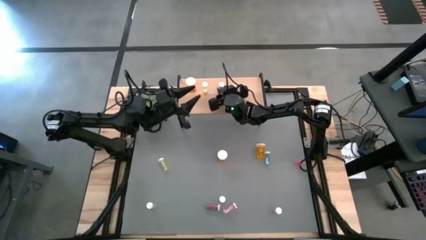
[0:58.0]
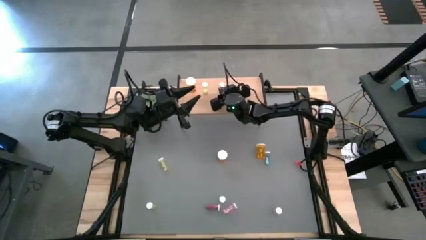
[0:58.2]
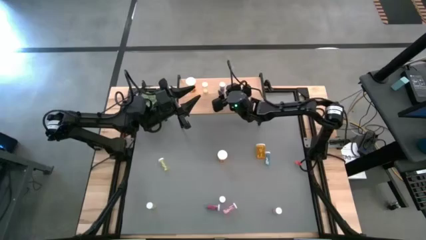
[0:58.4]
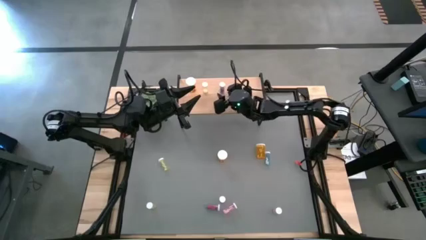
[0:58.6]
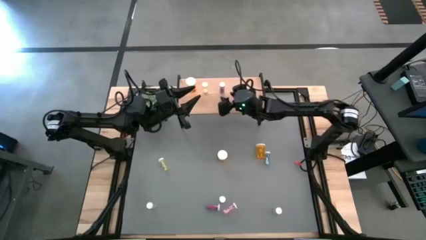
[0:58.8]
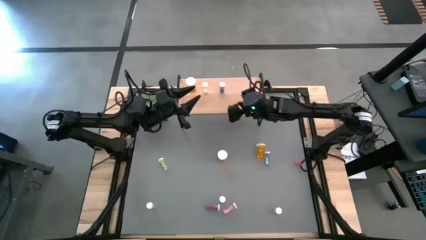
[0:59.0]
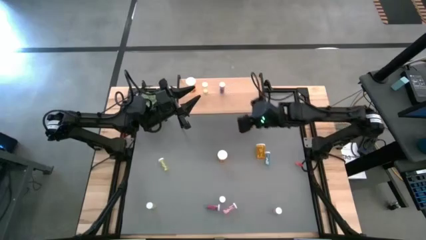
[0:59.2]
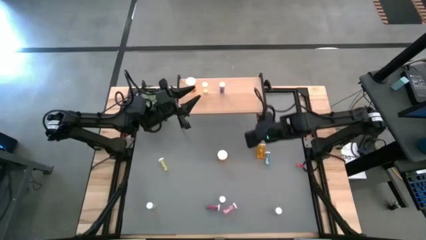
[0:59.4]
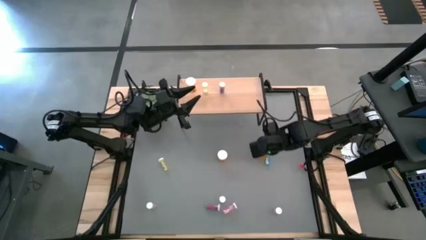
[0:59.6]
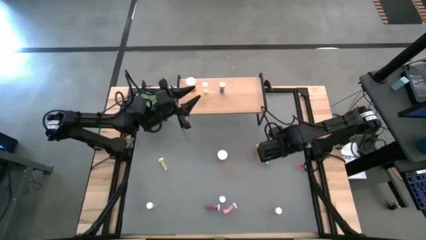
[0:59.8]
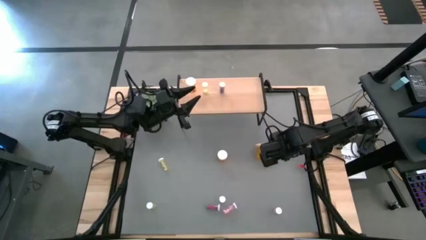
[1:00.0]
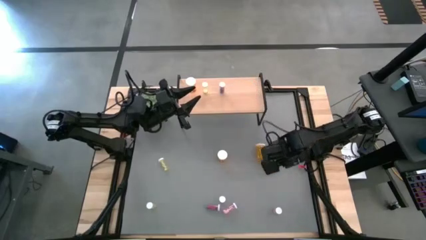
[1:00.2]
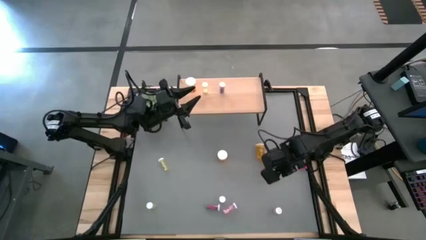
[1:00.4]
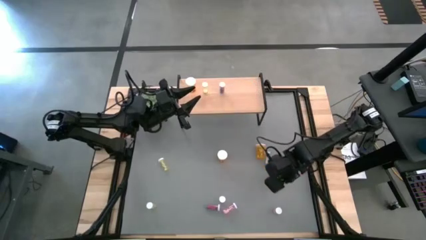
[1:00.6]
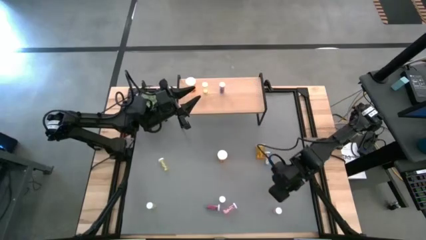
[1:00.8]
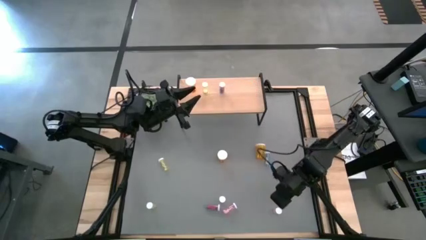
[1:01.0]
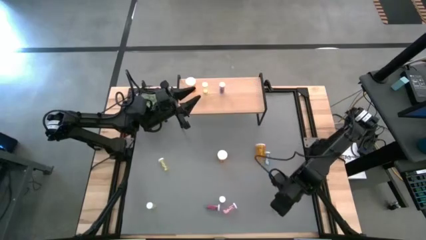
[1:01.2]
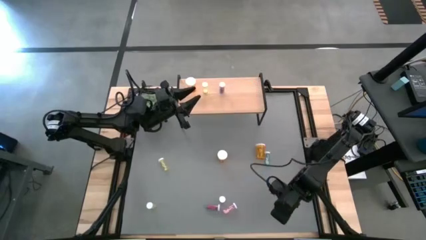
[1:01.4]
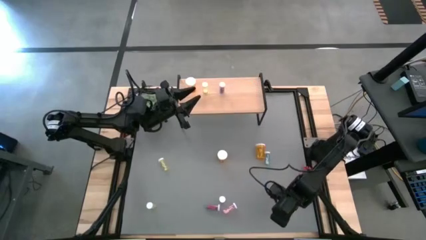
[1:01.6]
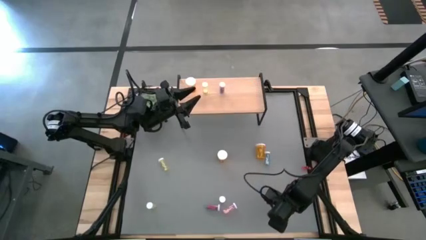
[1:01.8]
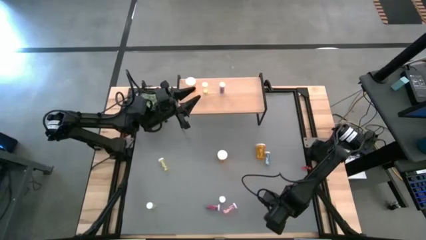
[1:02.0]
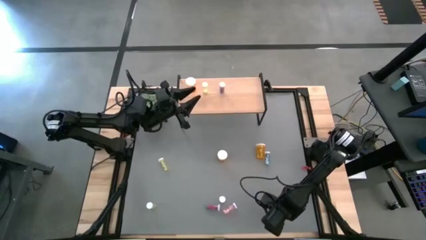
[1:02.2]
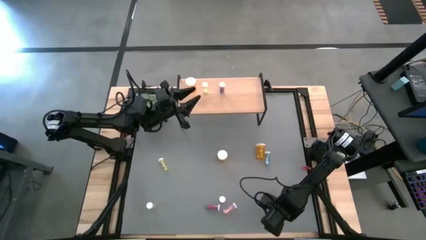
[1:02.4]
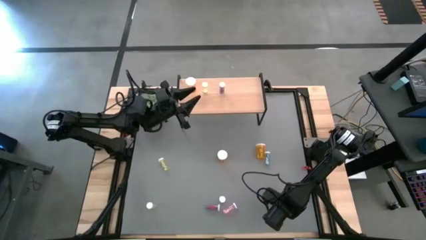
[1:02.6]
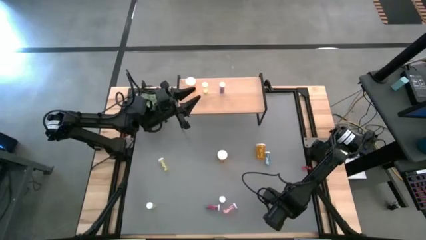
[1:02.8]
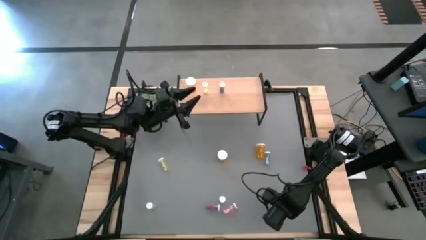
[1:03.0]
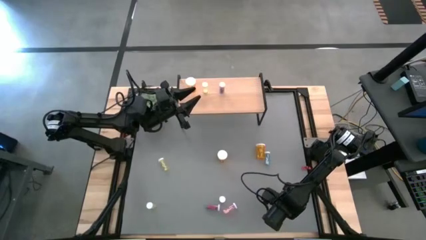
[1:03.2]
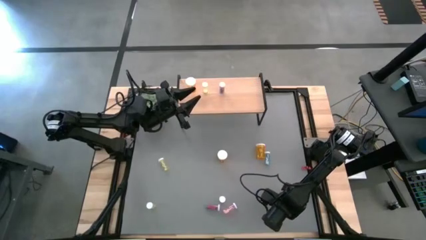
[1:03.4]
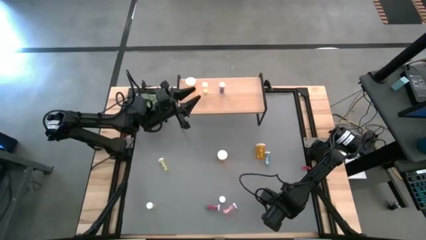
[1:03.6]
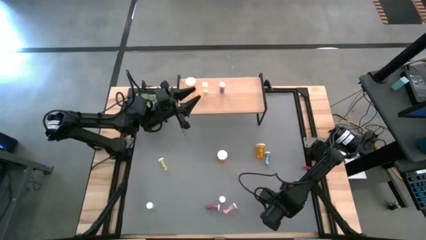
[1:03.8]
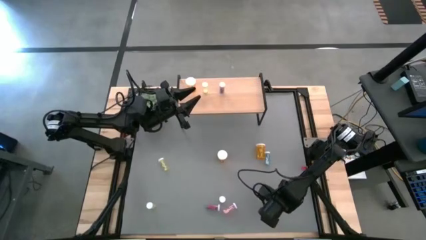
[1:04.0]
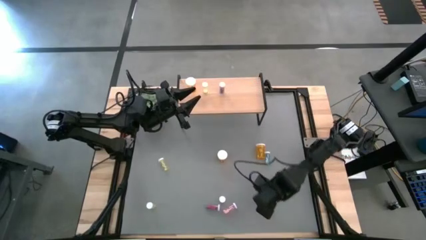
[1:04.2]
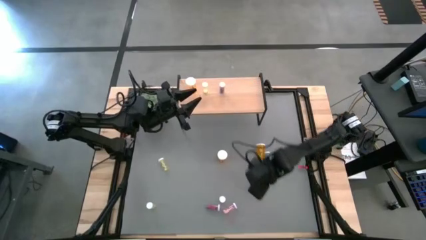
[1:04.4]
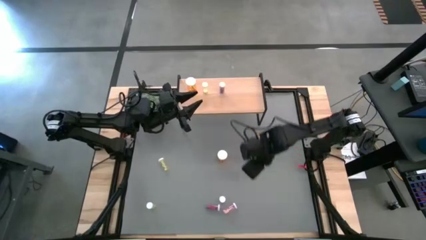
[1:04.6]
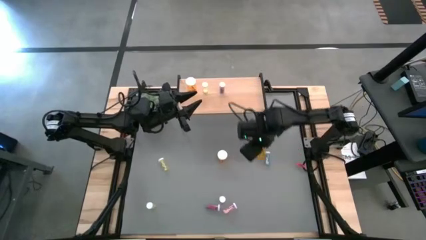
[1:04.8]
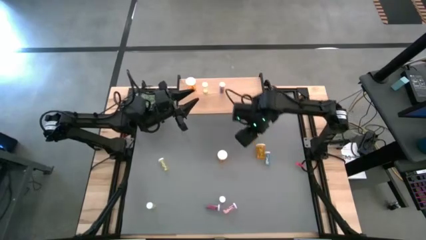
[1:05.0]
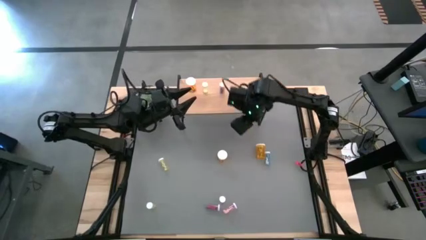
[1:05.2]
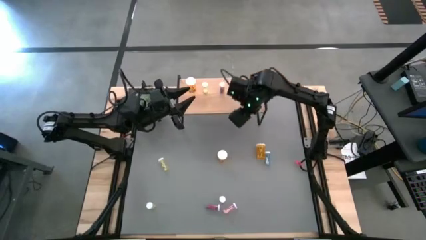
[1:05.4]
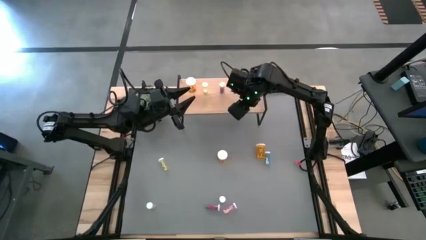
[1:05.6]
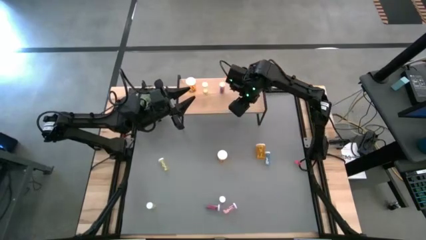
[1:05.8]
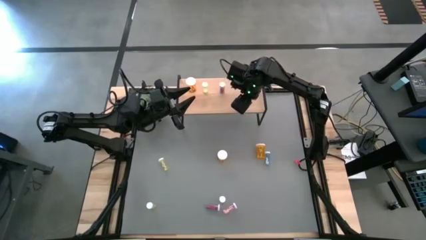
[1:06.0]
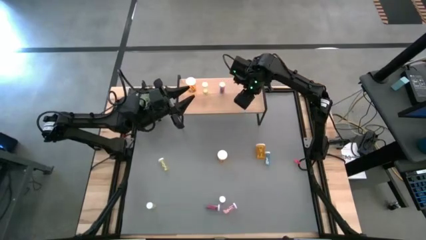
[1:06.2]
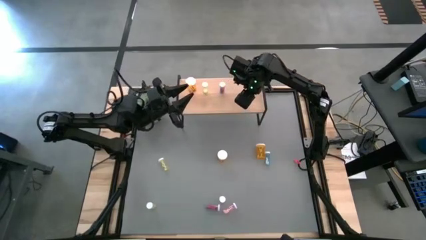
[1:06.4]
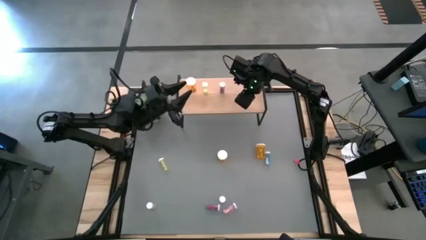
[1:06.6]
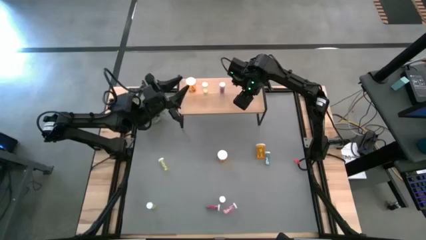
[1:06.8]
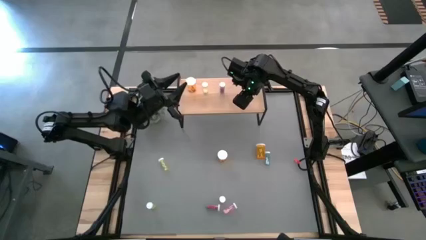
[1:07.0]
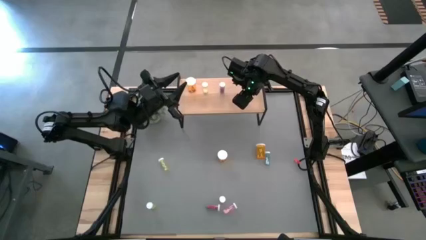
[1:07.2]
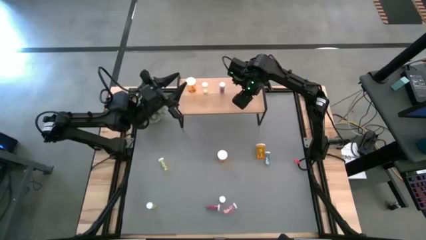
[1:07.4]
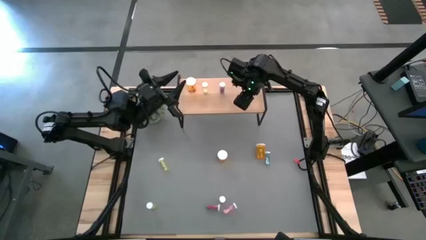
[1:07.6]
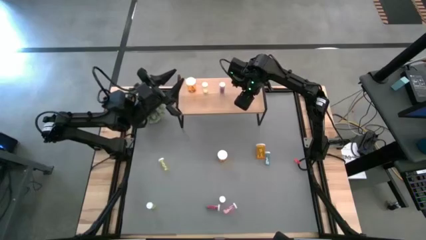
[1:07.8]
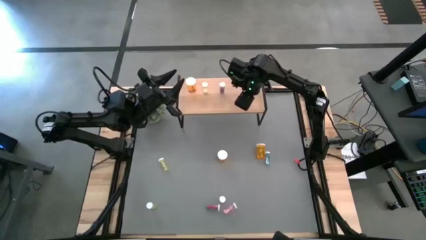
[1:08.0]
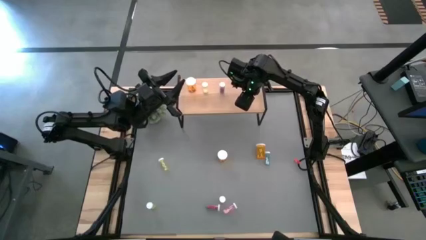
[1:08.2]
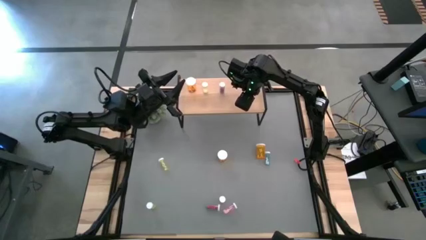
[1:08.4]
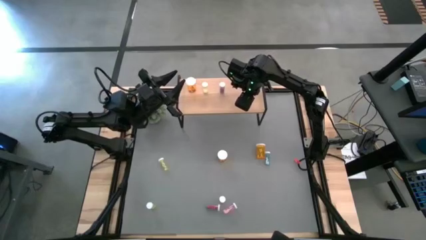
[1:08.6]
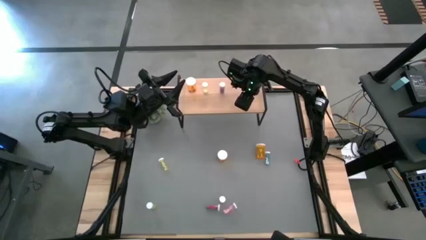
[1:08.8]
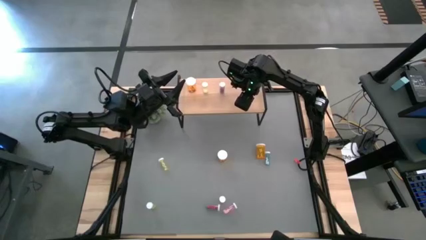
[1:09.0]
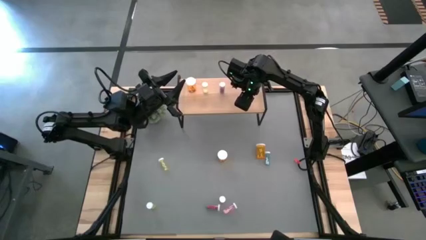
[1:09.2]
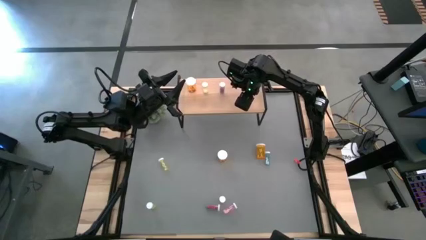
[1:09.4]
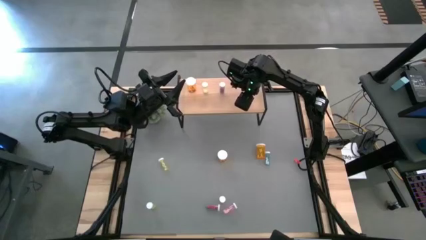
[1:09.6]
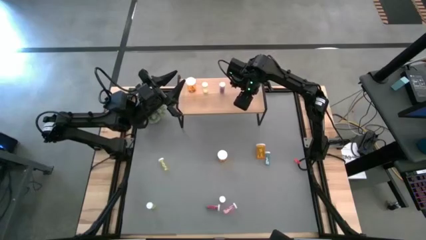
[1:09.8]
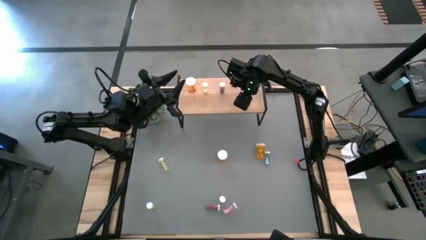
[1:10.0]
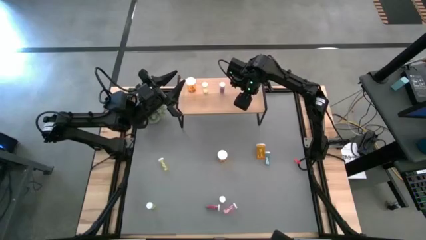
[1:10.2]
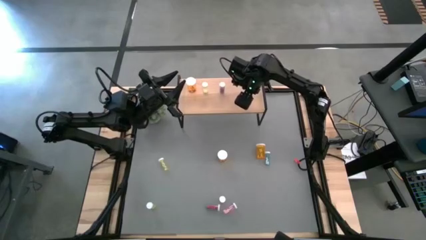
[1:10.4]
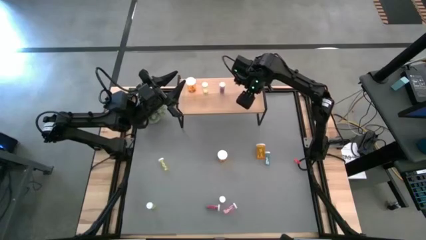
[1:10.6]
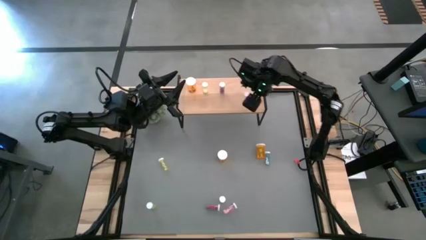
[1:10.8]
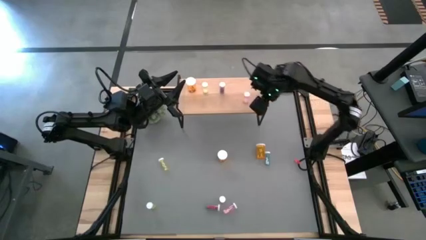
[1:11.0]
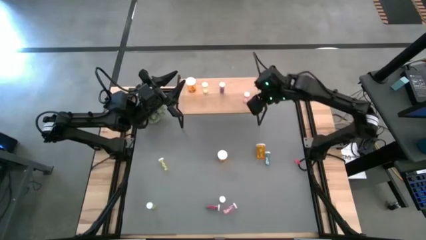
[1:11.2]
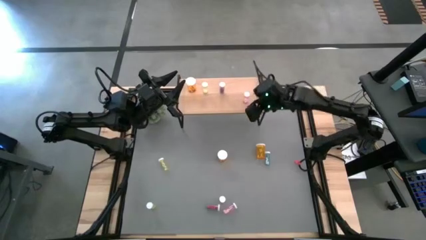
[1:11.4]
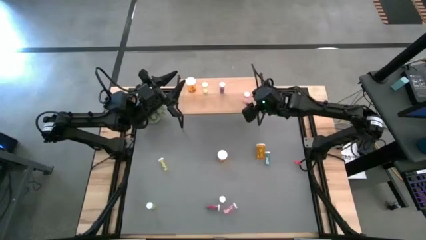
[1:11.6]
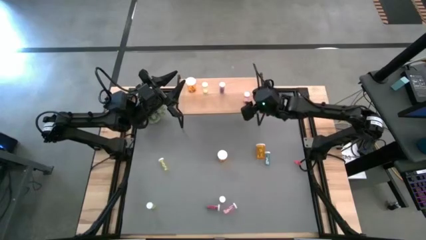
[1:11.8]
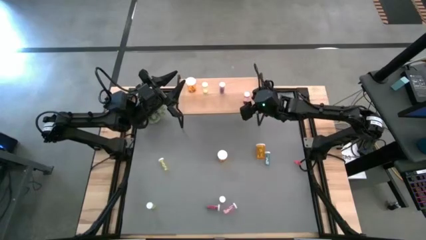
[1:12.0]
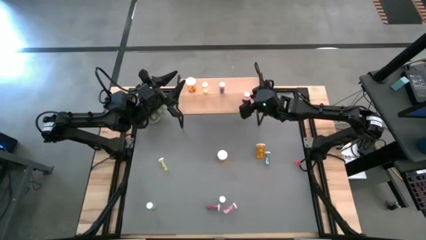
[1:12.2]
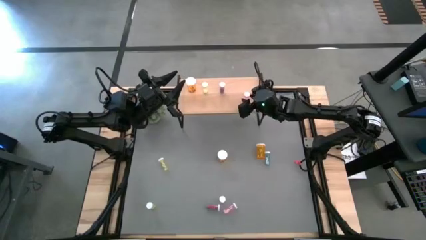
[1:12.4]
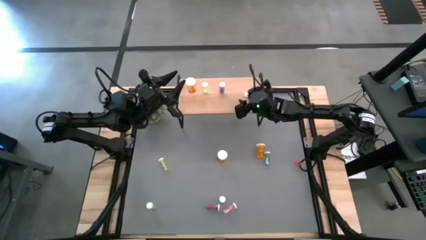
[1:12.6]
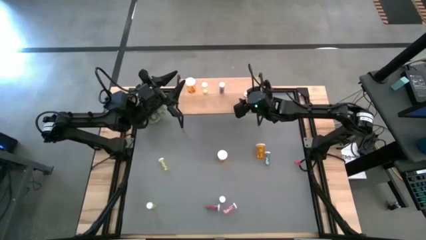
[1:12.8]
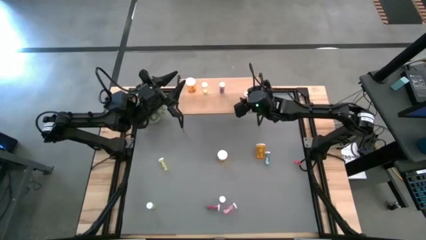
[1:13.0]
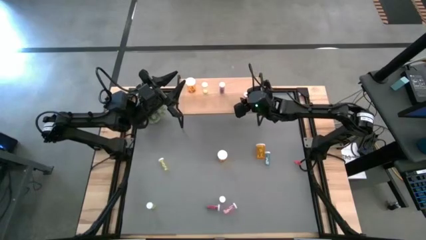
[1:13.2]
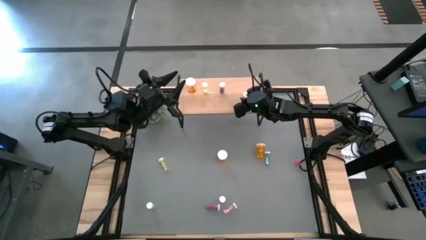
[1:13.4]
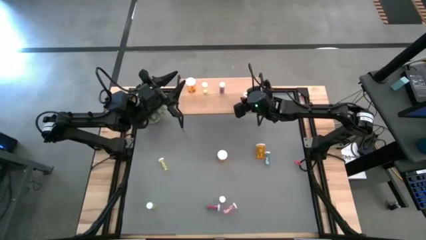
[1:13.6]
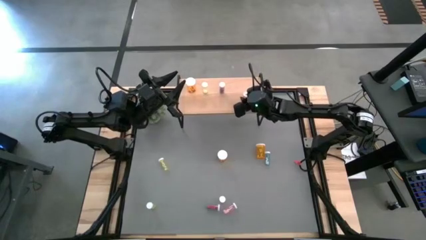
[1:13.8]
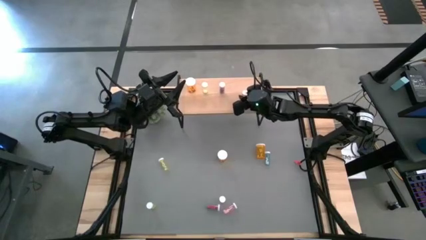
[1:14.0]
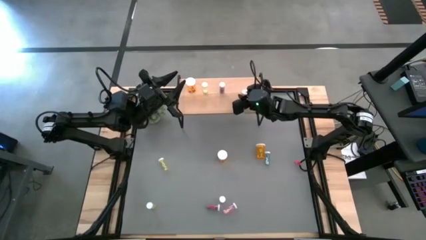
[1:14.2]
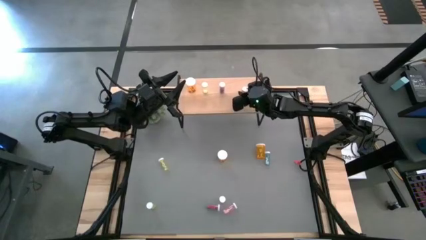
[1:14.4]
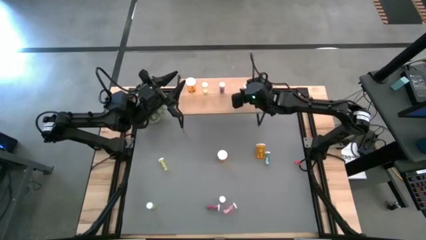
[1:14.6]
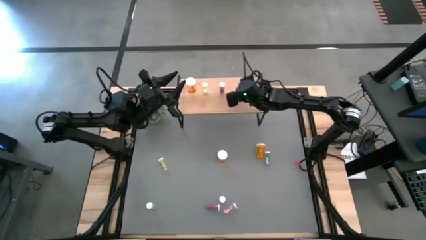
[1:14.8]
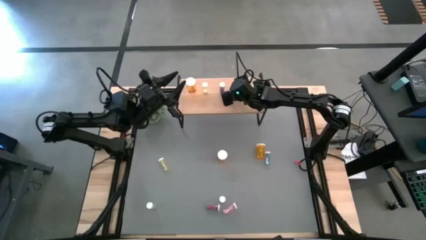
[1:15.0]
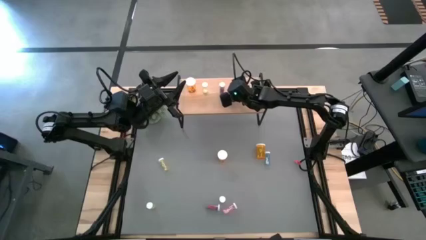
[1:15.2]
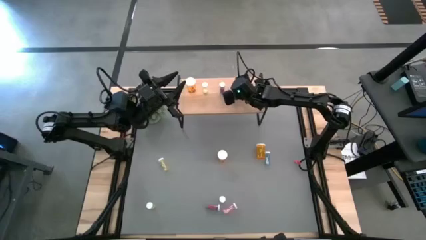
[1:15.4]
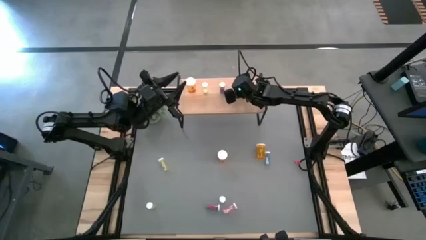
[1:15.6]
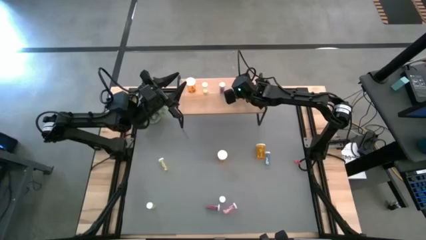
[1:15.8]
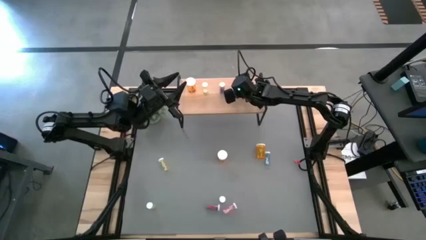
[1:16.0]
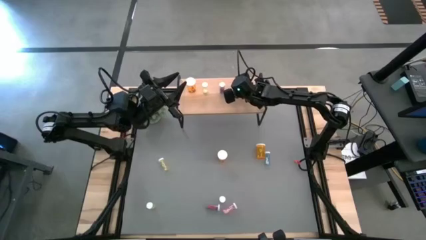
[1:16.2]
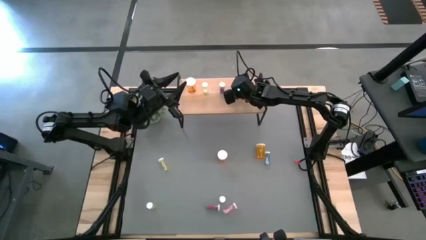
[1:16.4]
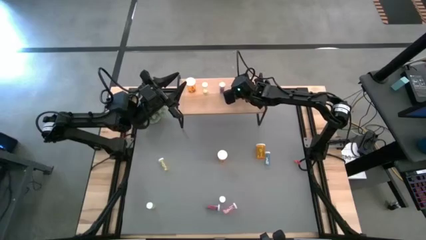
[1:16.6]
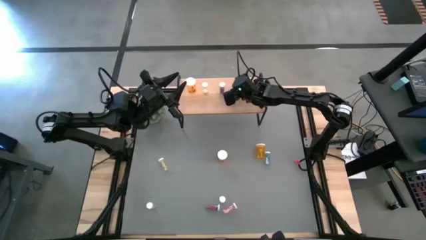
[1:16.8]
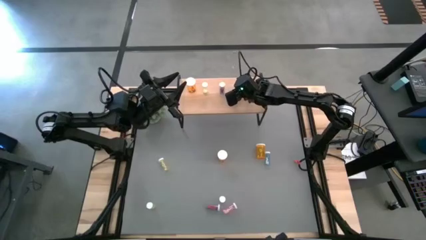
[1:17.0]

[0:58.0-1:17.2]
Task: Pick and place medicine bottles onto shelf by color
Put the right pink pill bottle to the right of the blue pill bottle on the shelf
